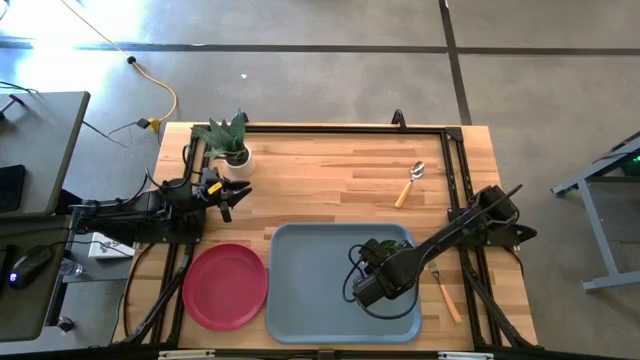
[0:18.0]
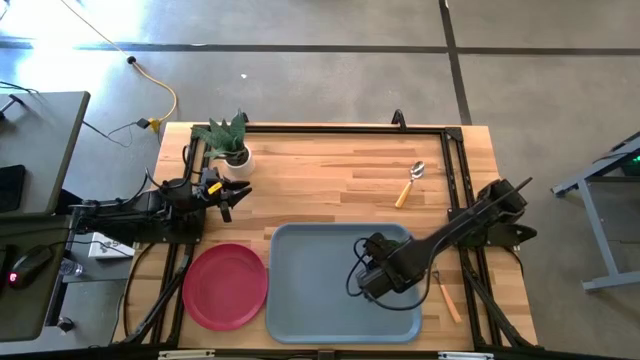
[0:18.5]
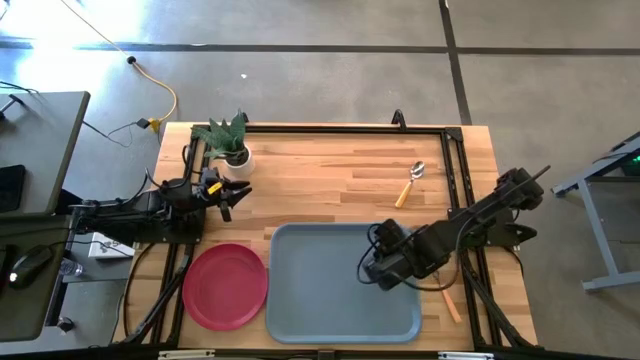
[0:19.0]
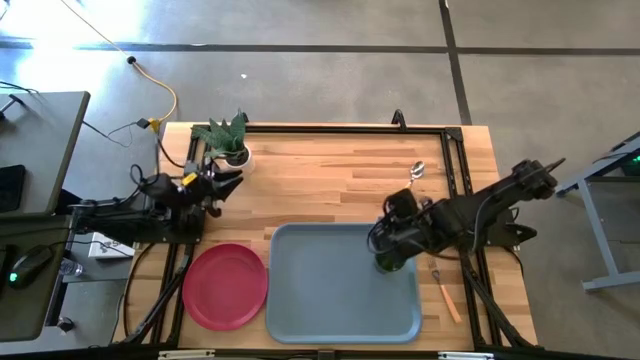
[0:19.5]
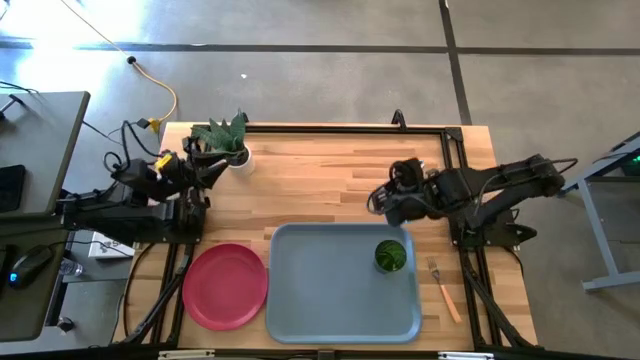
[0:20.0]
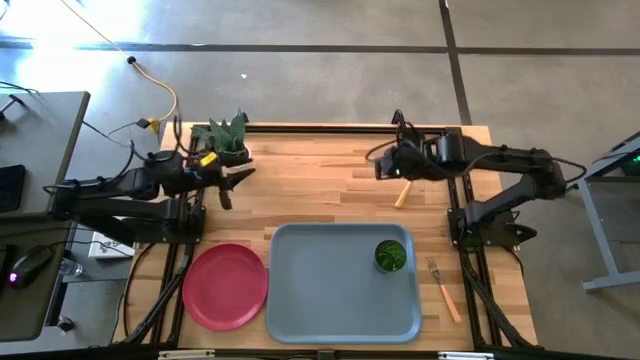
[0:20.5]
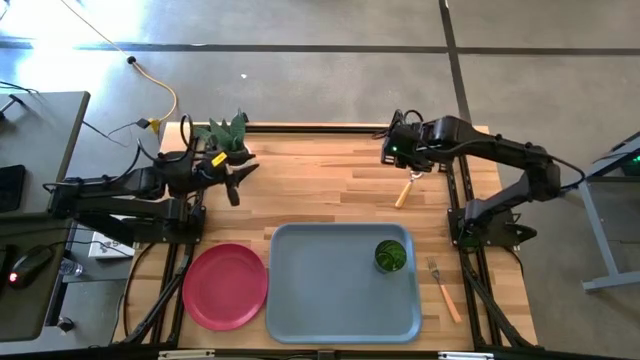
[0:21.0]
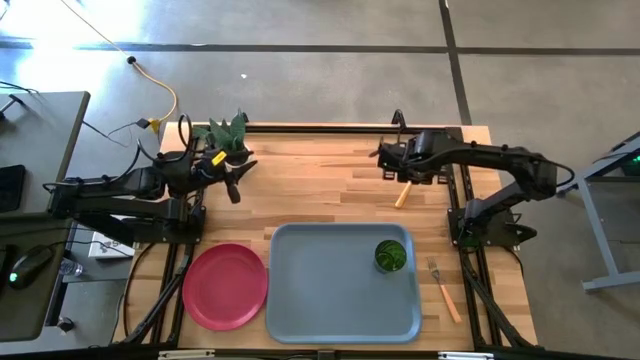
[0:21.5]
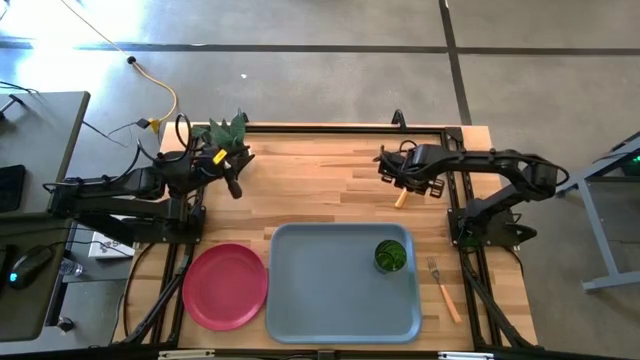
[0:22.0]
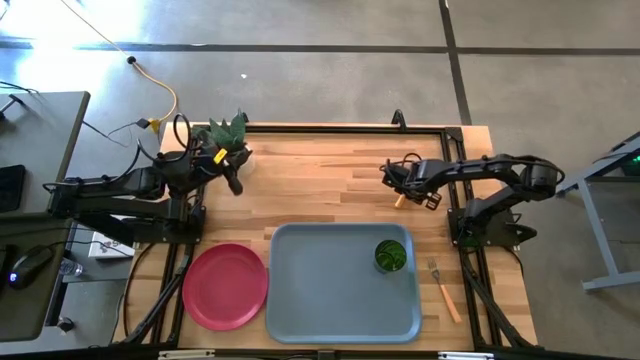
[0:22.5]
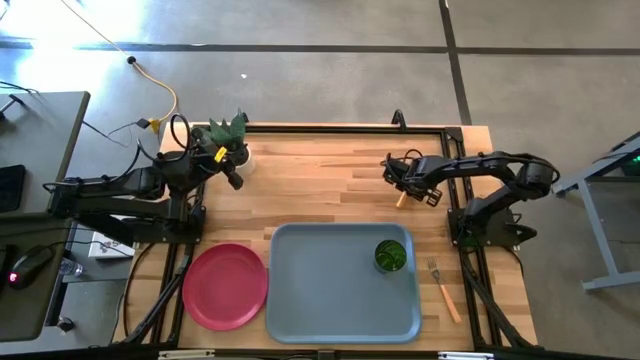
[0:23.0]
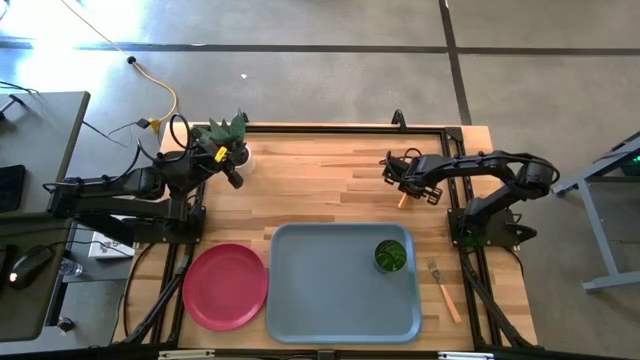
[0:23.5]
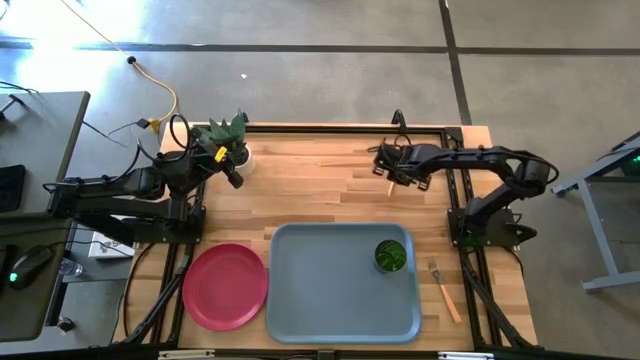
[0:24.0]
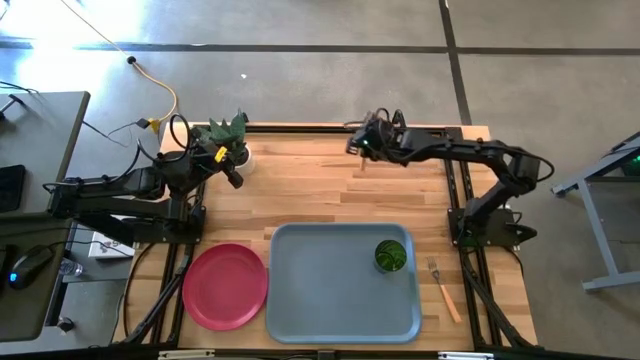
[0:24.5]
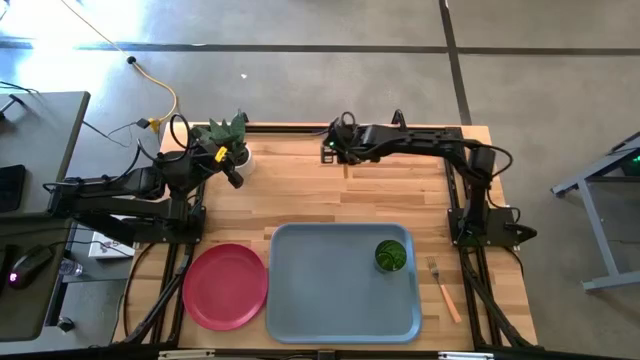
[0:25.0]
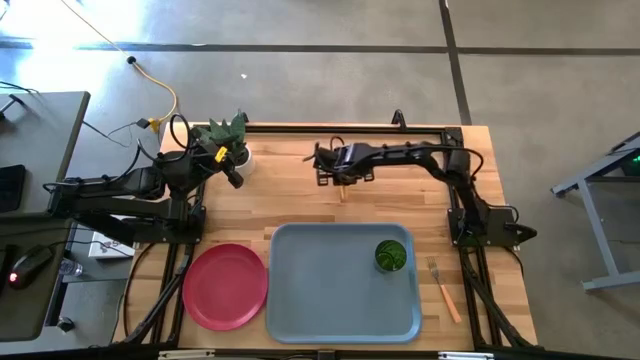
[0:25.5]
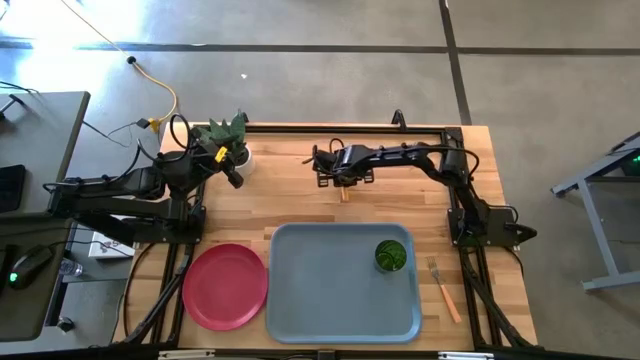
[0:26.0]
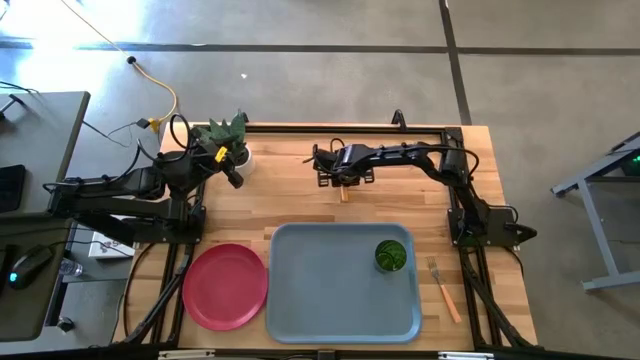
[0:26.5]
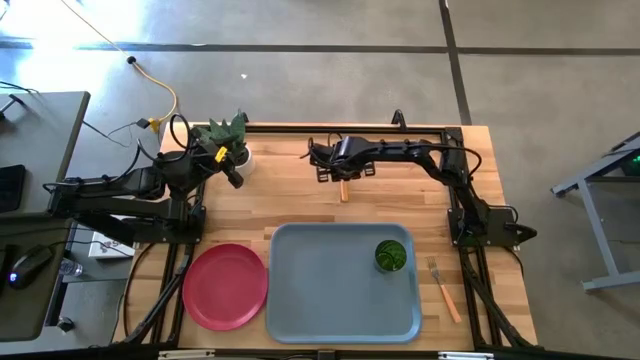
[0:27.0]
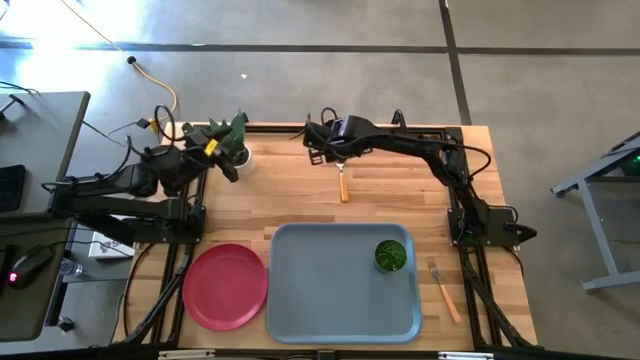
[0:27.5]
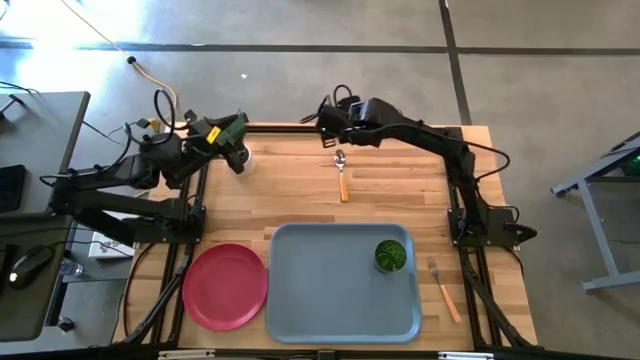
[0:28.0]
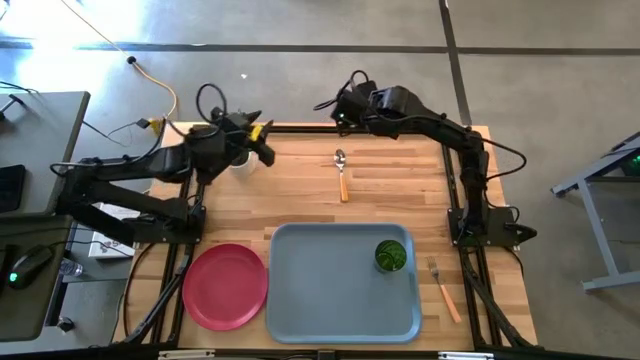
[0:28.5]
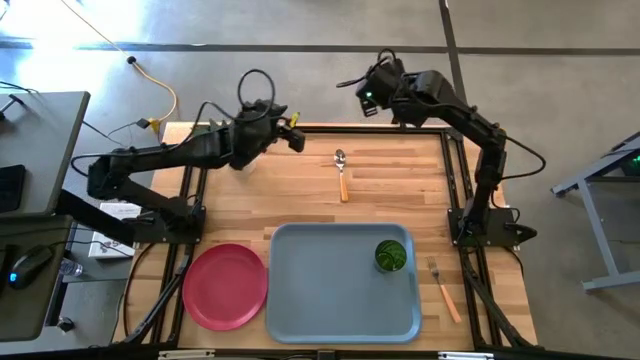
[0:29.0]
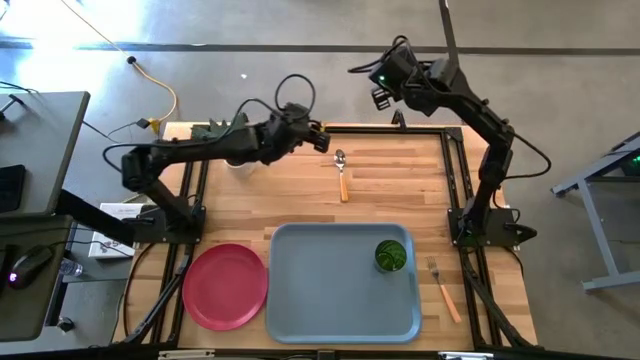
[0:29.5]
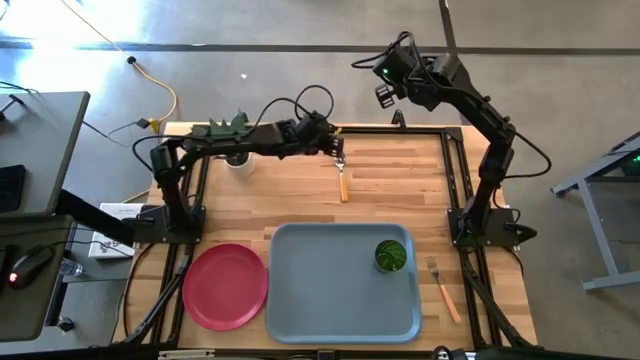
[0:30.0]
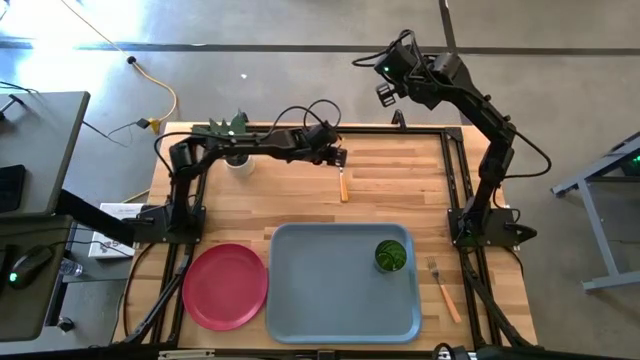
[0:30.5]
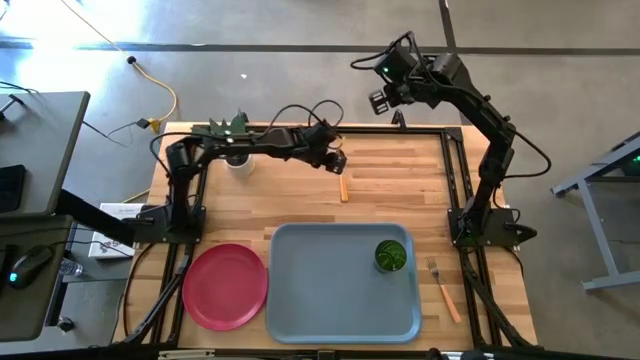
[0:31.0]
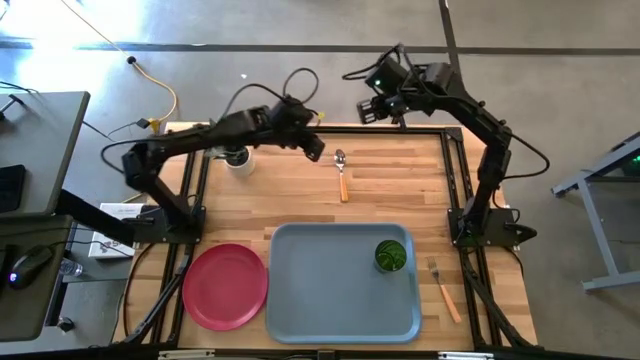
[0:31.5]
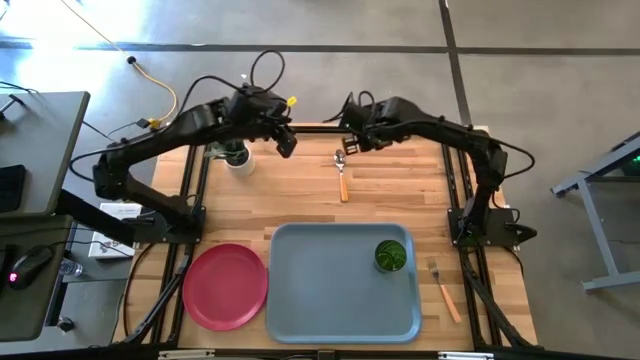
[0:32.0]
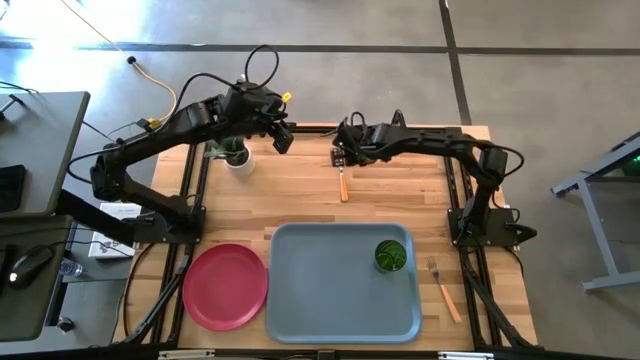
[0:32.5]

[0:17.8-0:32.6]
Task: Pick and place plate/cup/fork/spoon on tray
Put the yellow spoon on the blue tray

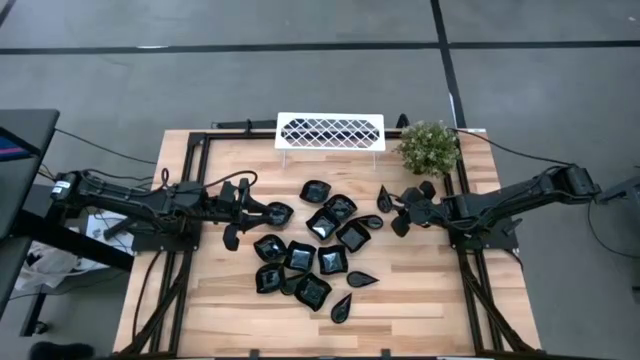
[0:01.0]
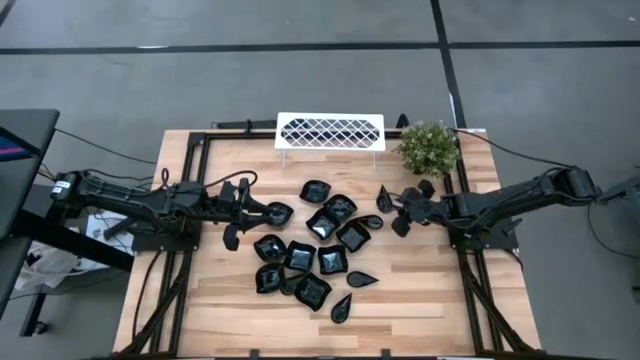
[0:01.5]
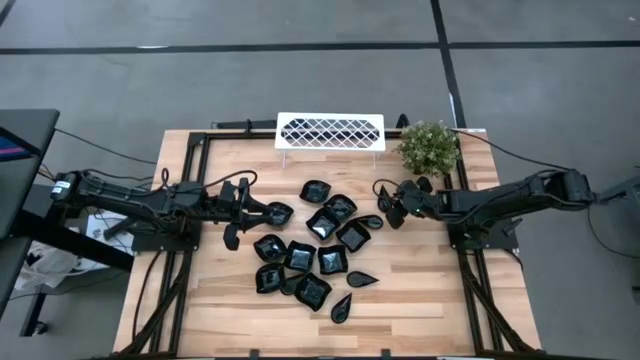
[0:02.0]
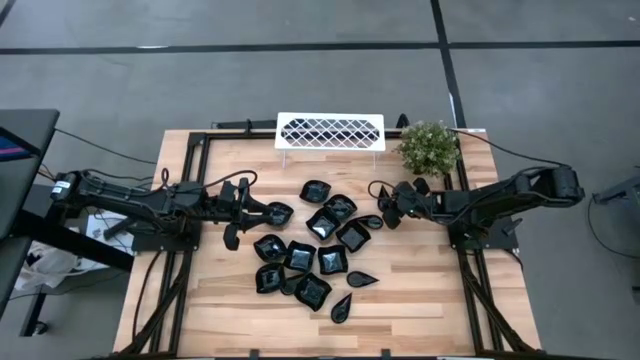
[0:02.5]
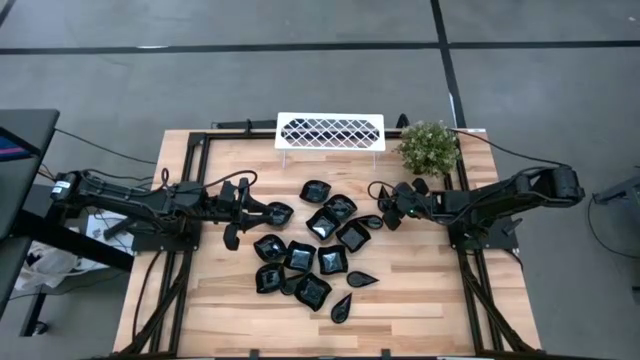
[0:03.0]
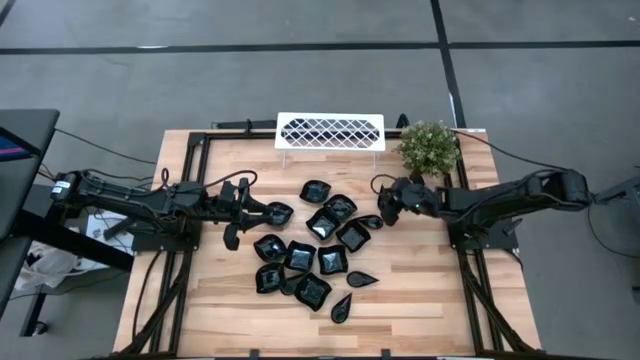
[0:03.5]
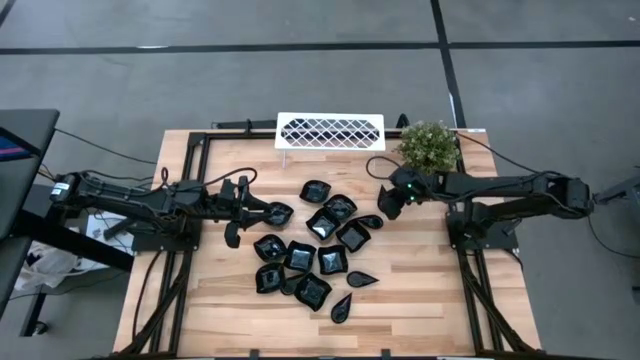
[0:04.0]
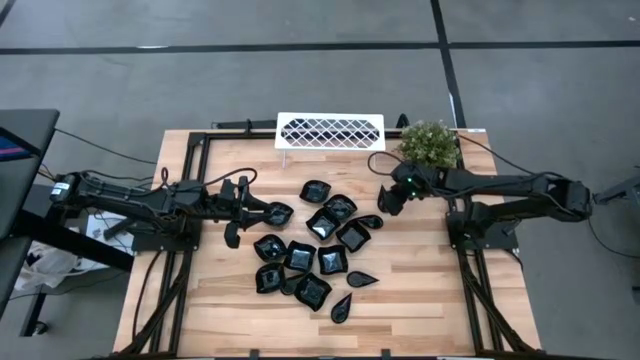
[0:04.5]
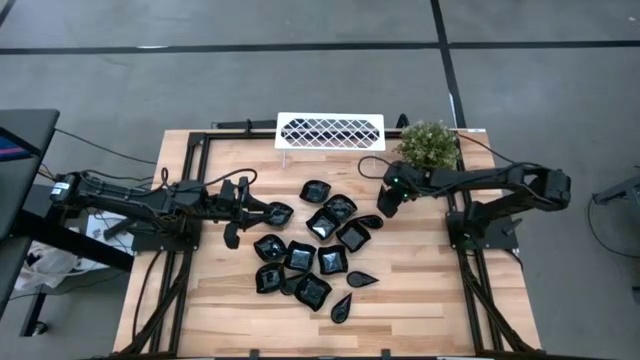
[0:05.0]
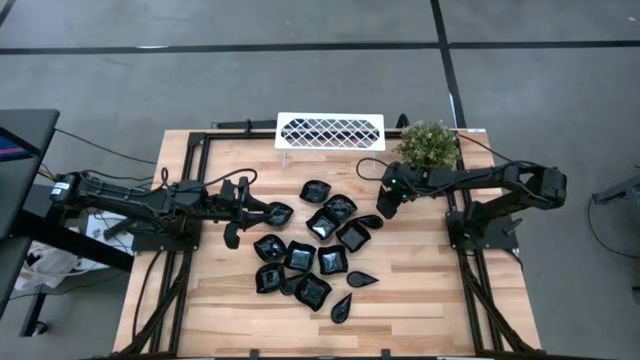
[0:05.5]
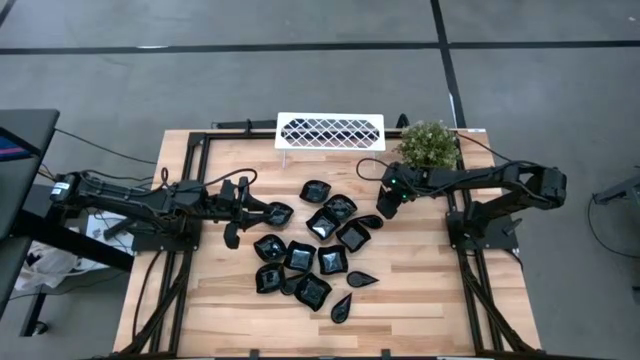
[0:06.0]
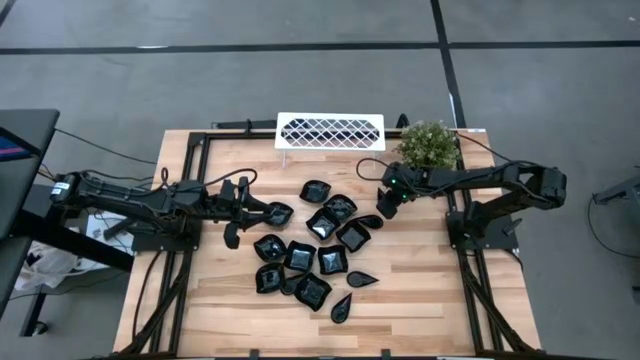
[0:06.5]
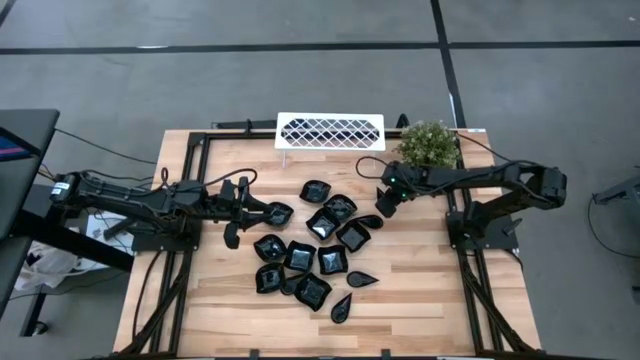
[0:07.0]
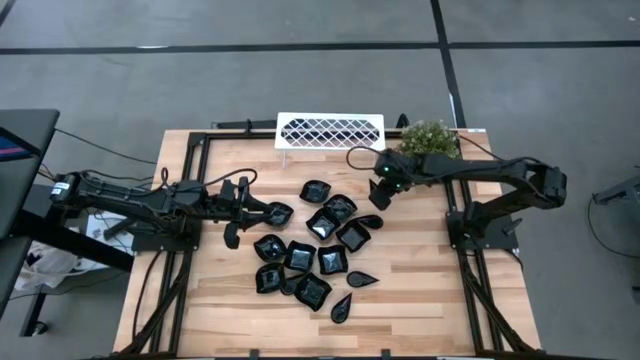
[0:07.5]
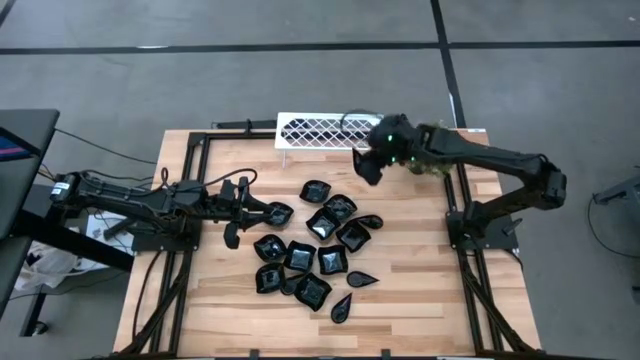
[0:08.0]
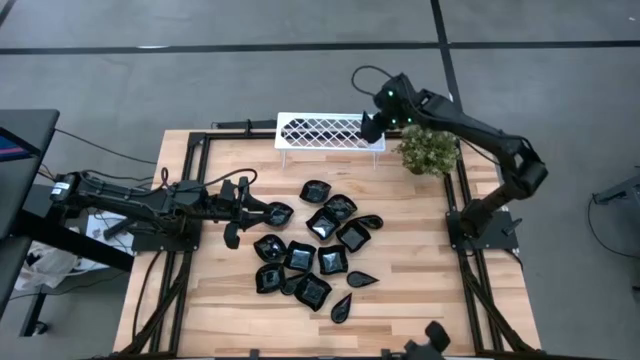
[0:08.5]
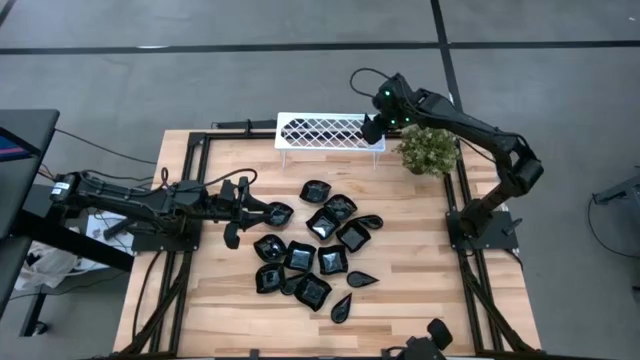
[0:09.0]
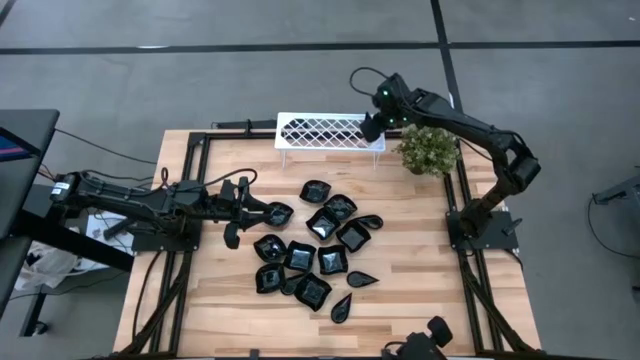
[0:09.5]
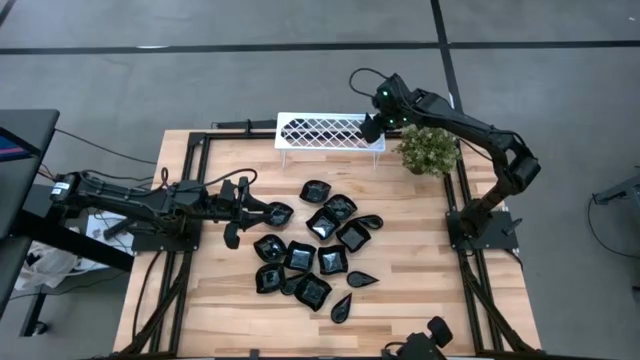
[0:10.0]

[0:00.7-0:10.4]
Task: Pick & Place Mini shaped plates
Put the drop-shaped plate on the shelf
